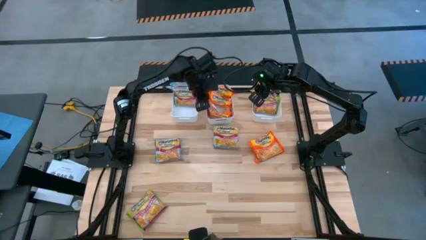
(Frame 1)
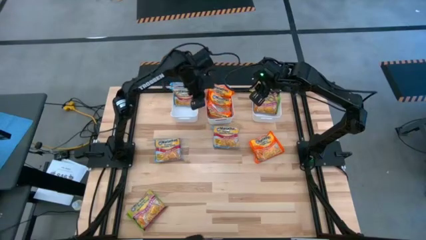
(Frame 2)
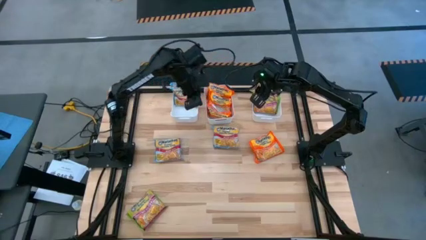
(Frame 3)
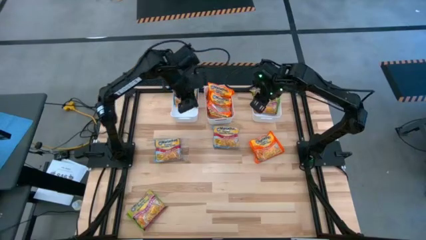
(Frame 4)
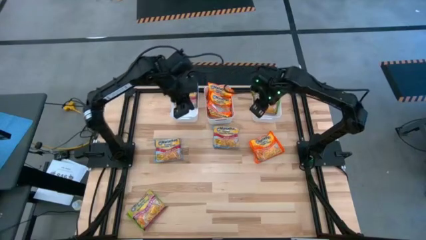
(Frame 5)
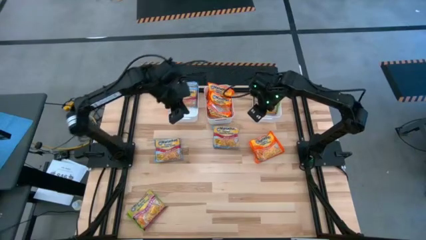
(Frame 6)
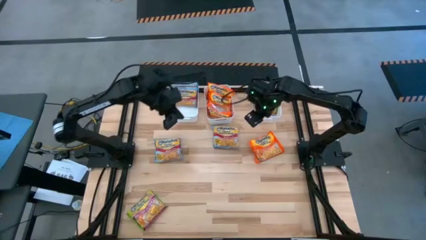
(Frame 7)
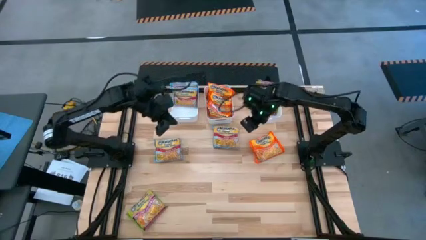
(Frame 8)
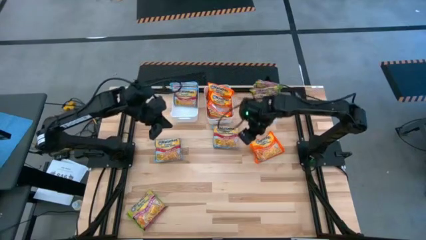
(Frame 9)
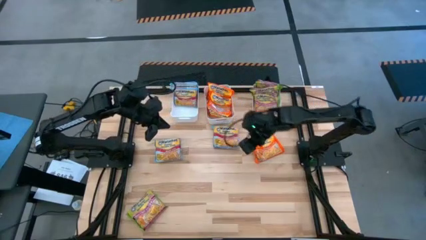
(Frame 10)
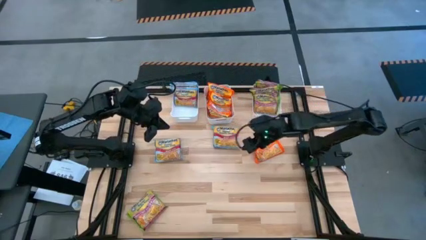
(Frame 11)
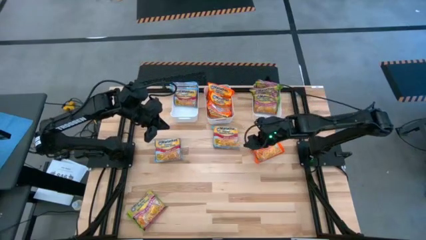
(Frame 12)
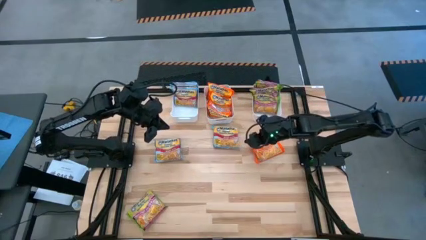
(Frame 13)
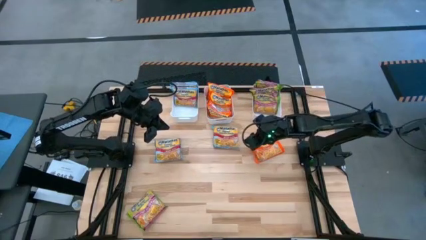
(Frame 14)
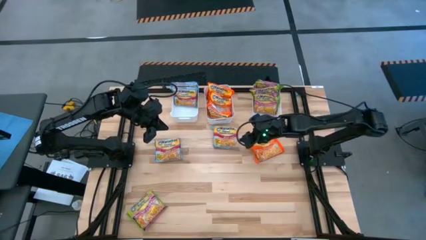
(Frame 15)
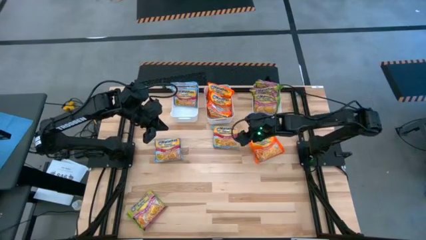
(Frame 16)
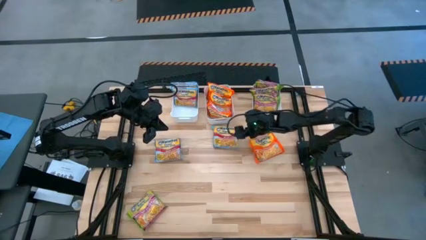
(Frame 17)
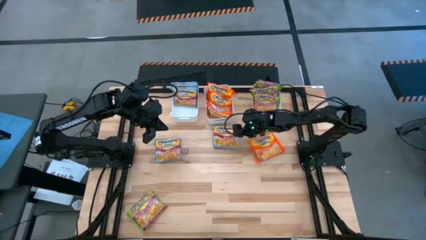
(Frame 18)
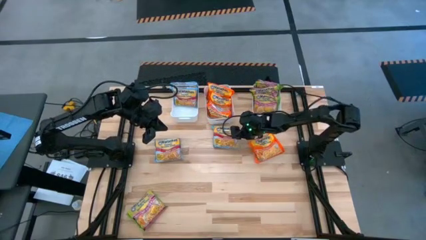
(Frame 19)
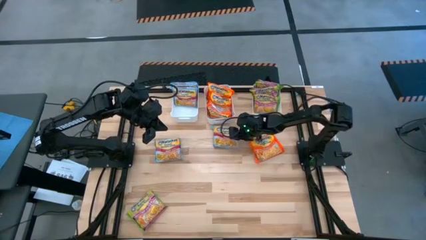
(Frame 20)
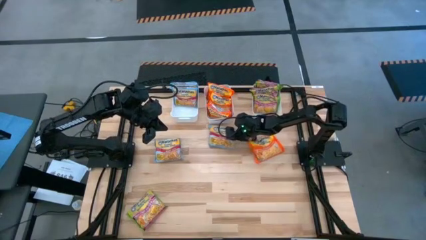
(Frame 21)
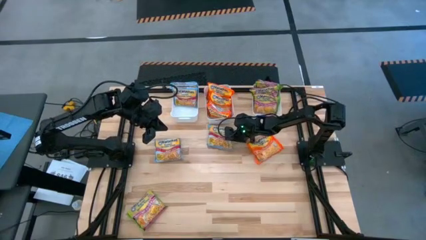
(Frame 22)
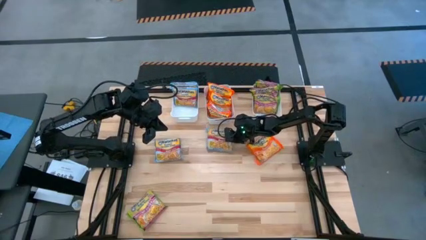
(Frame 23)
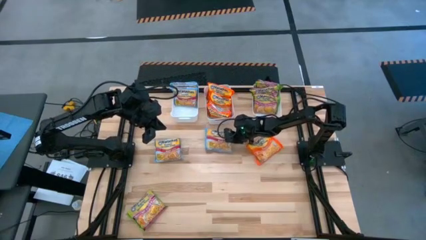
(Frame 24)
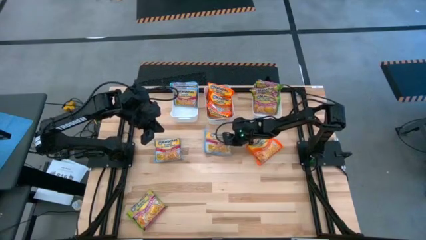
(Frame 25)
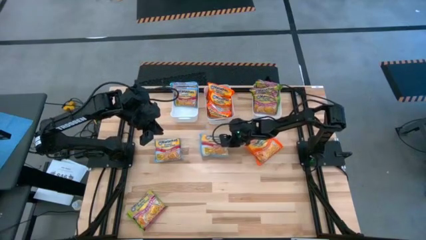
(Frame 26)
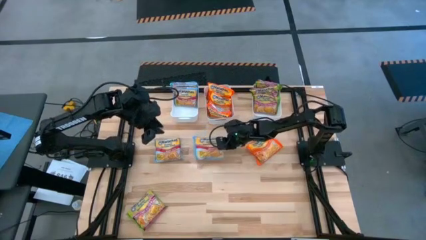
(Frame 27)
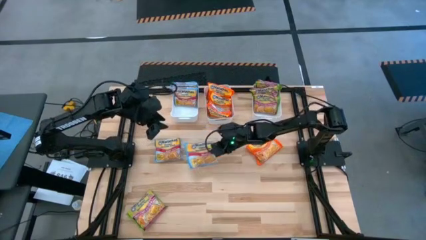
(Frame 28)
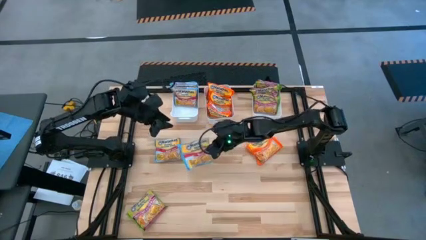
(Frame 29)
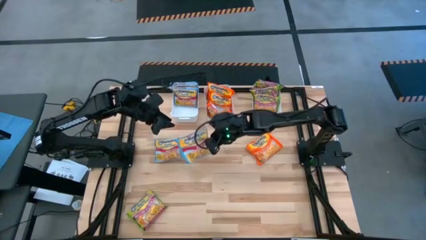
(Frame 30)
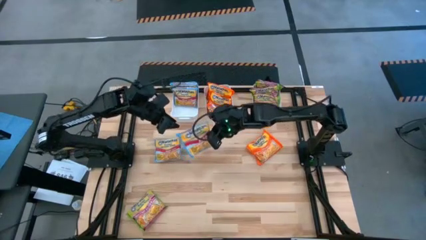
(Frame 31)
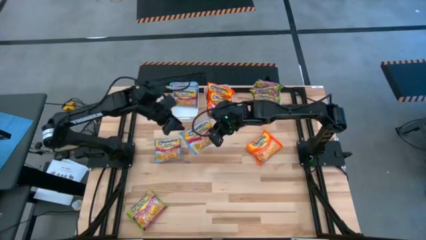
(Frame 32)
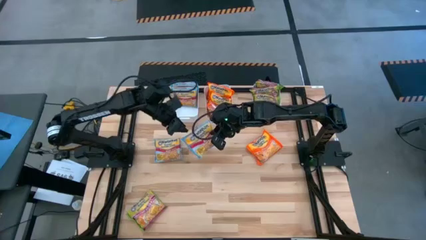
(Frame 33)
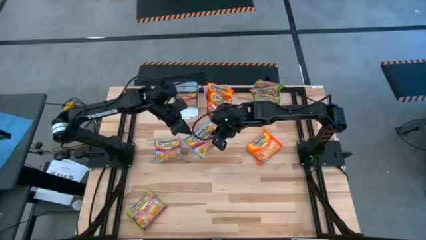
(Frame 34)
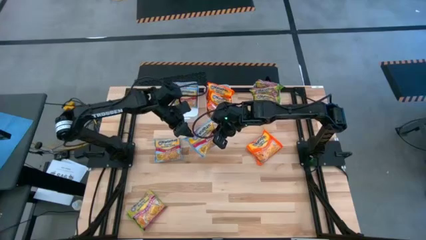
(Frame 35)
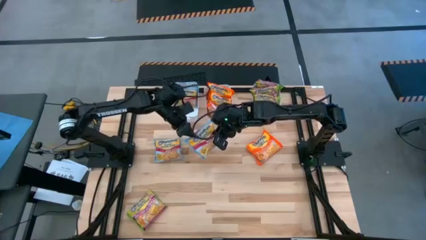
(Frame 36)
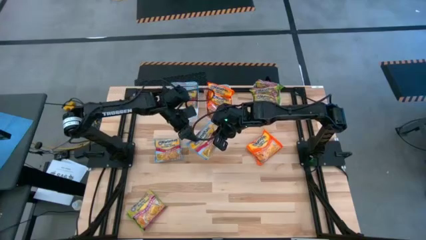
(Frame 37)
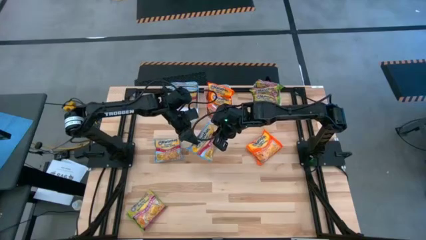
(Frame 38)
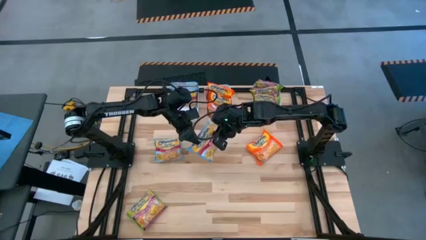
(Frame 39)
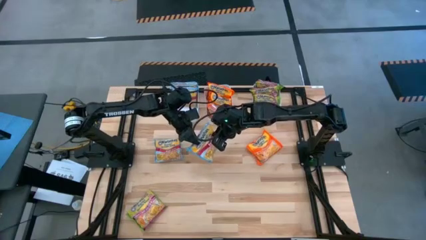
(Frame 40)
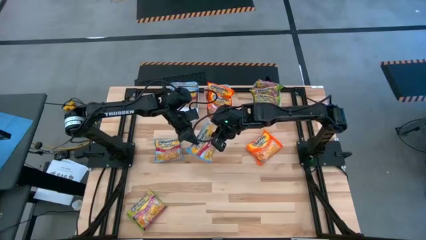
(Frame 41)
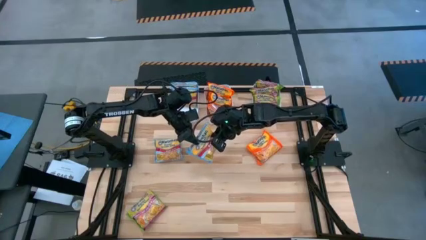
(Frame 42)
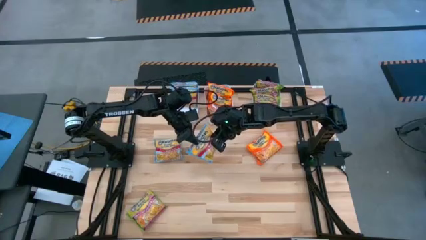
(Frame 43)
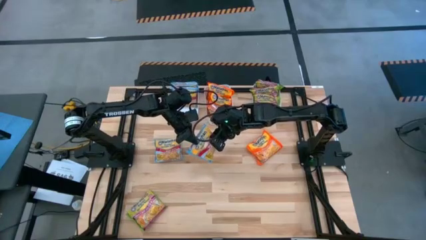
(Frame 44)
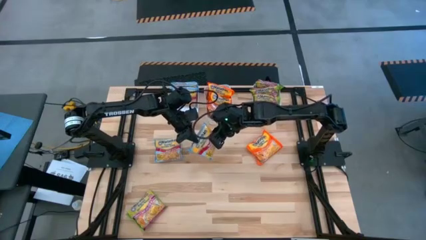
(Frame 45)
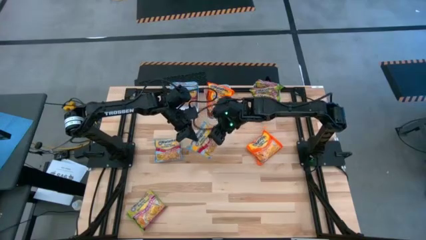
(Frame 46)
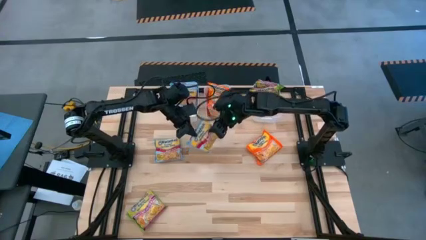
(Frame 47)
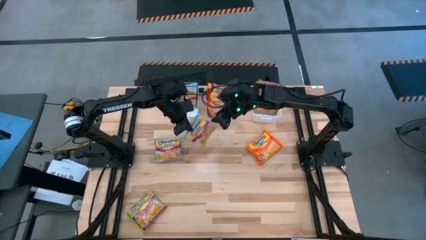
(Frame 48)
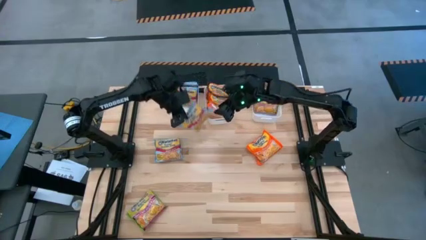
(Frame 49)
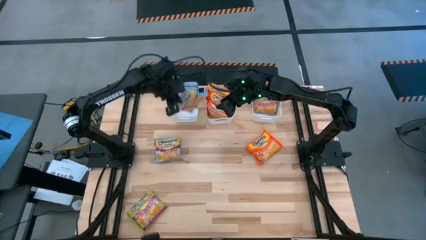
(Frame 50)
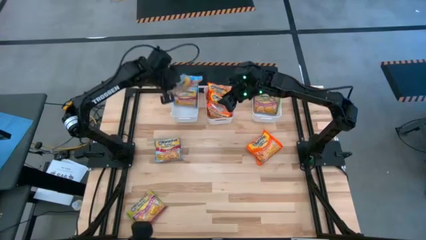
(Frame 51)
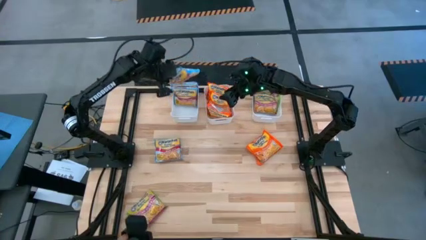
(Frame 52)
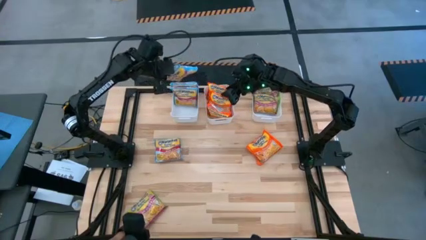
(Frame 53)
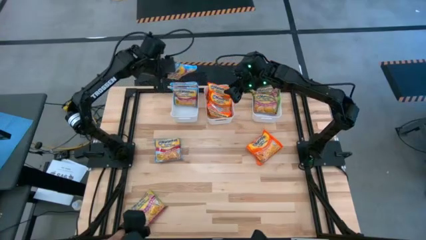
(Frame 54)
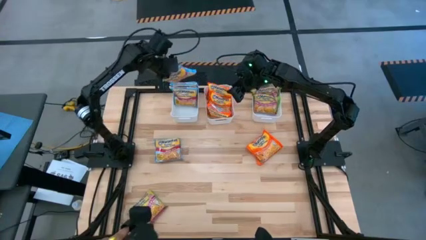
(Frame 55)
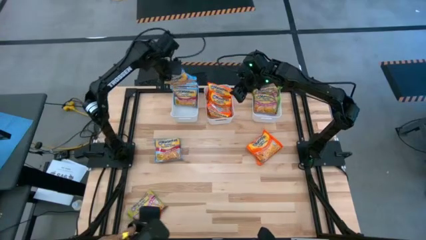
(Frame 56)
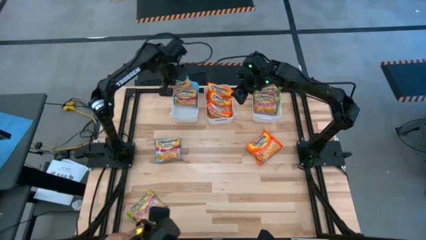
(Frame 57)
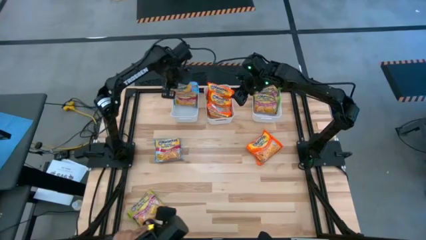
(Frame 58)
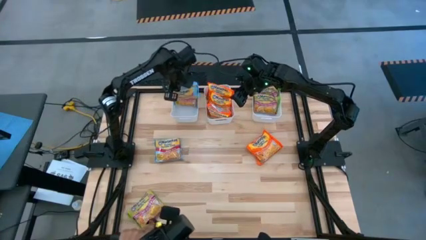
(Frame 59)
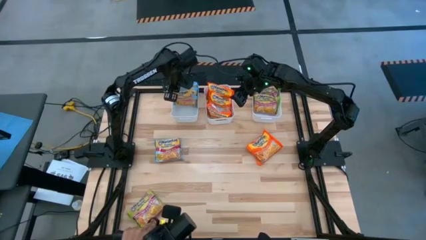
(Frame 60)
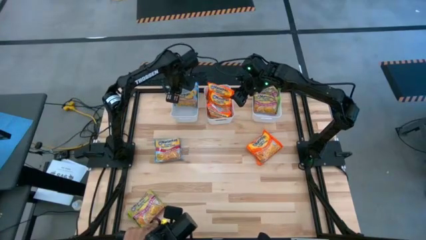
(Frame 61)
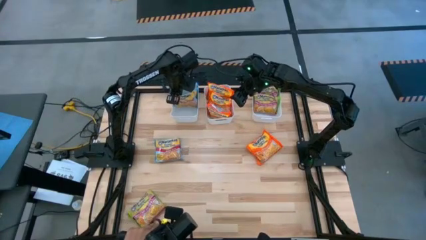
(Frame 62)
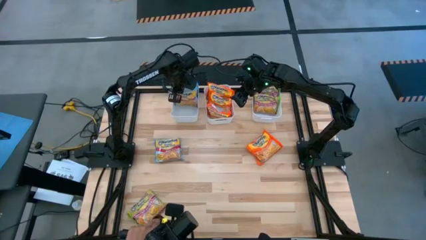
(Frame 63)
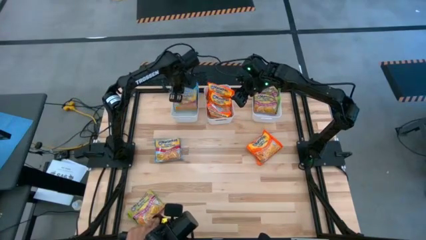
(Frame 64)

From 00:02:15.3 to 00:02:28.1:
Task: Sort Maruchan noodles
Put the blue noodle pack into the top left white bin

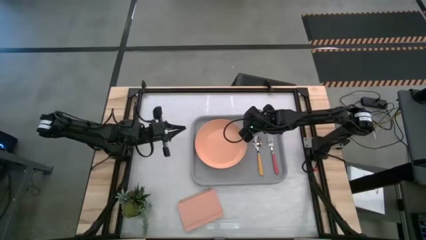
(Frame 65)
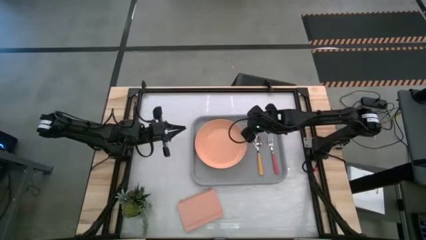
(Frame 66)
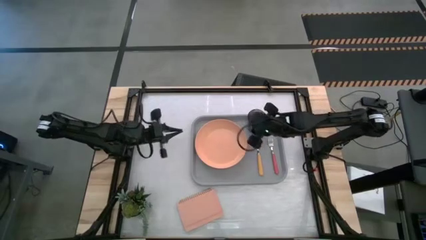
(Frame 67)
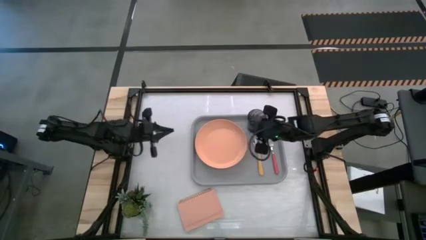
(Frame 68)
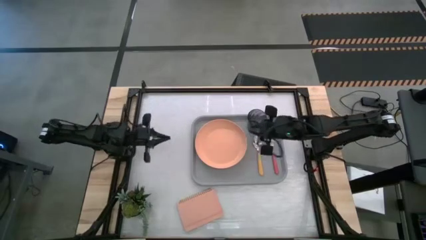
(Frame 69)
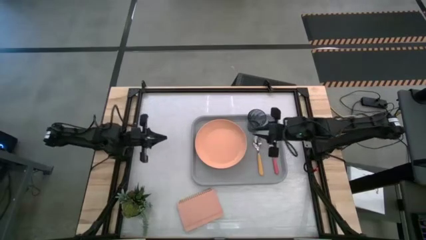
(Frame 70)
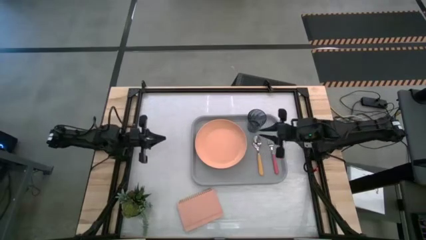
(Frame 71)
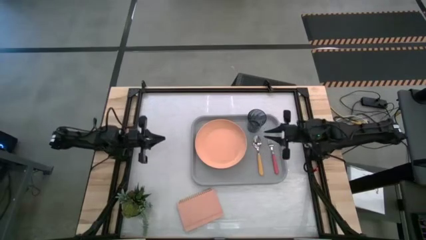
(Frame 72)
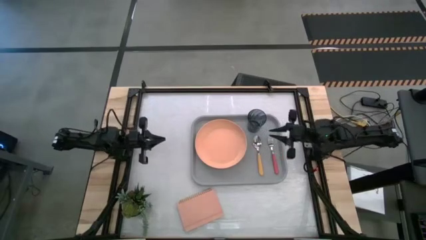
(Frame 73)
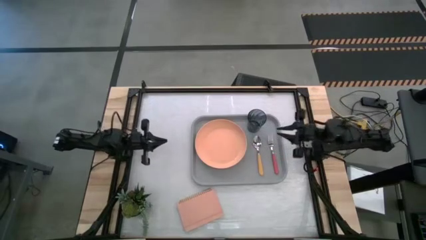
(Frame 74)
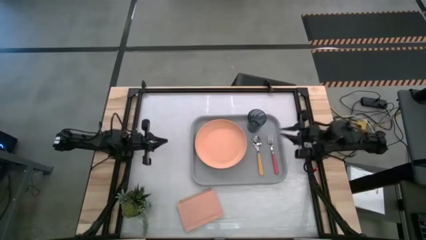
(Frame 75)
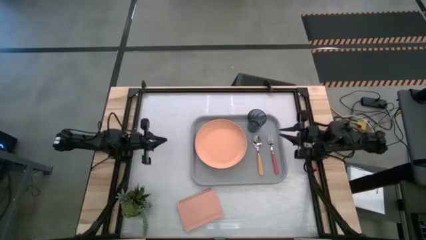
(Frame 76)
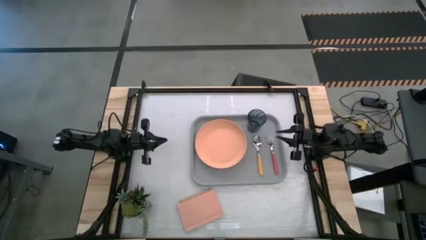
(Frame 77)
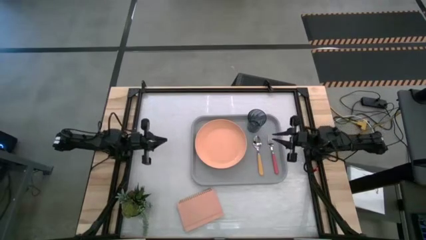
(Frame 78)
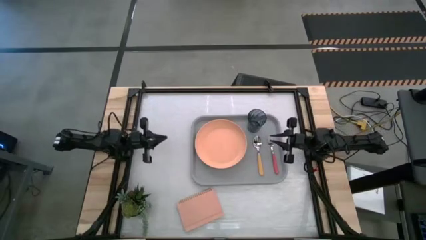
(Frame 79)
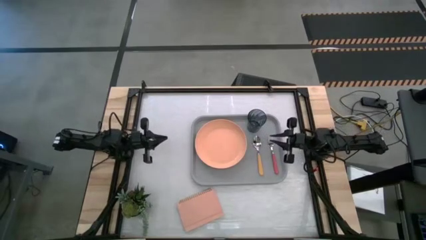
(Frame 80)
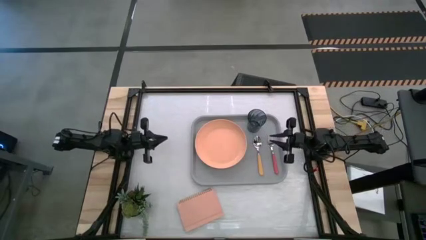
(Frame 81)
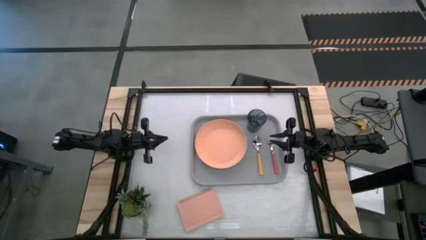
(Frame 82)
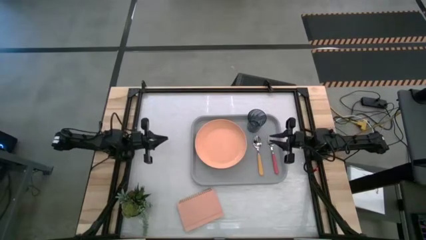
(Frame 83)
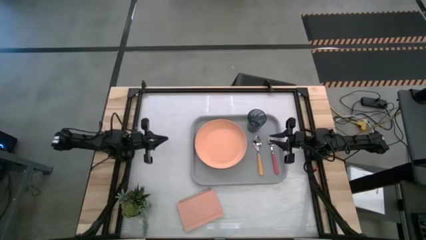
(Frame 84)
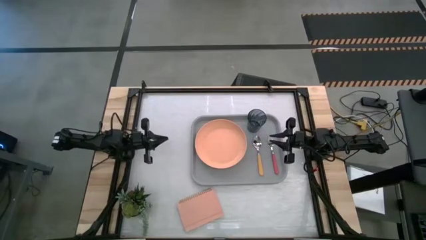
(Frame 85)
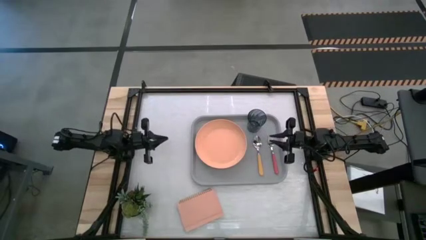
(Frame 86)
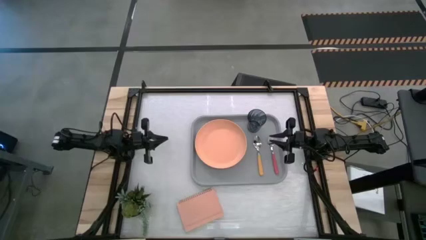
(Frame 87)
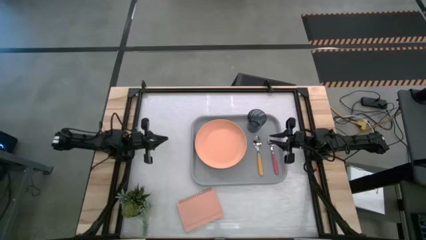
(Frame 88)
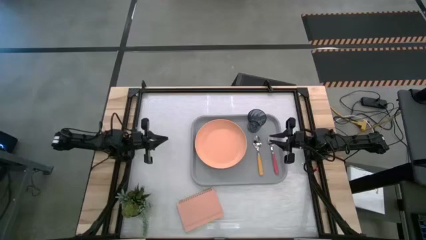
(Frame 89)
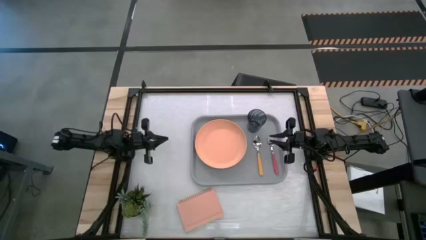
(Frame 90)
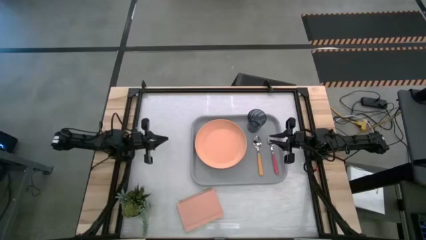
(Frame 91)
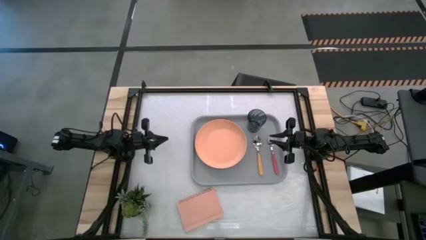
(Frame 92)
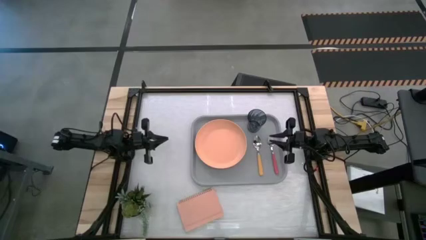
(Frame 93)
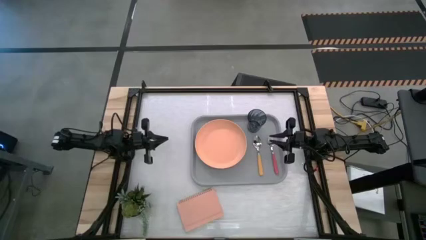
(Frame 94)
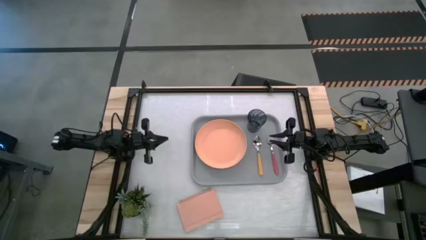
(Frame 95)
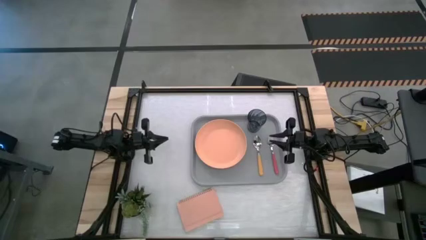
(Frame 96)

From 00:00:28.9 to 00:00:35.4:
Task: Pick and place plate/cup/fork/spoon on tray
Return to Home Position
